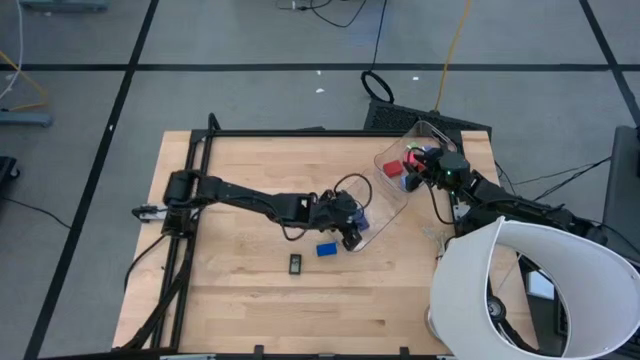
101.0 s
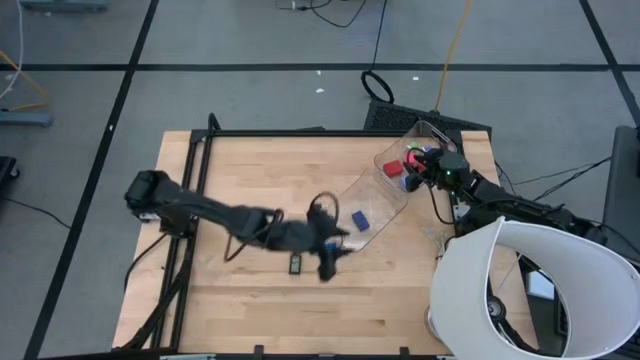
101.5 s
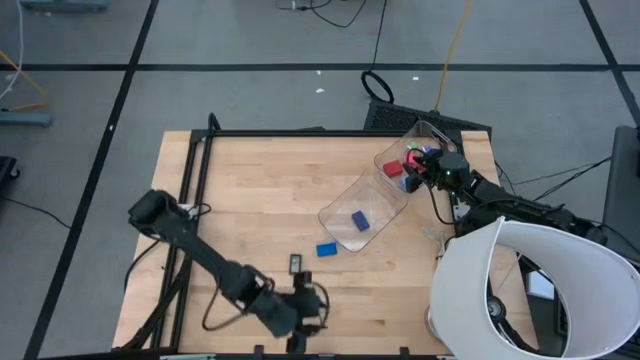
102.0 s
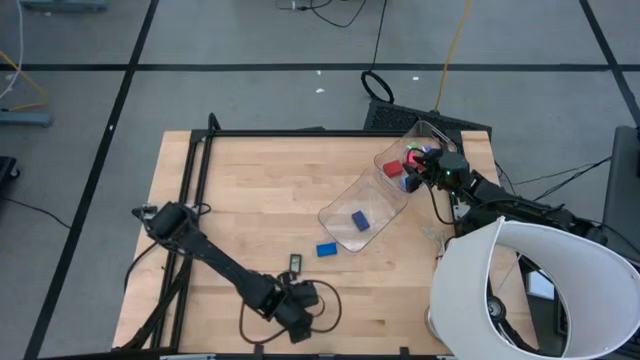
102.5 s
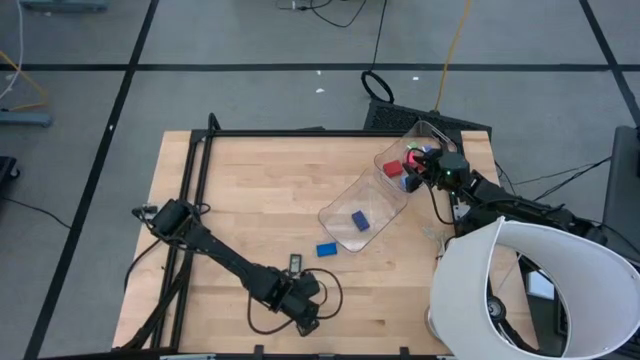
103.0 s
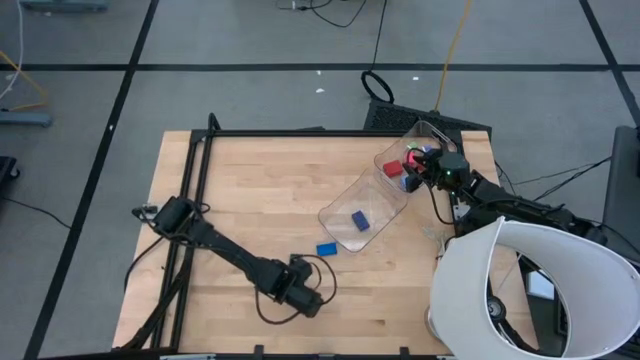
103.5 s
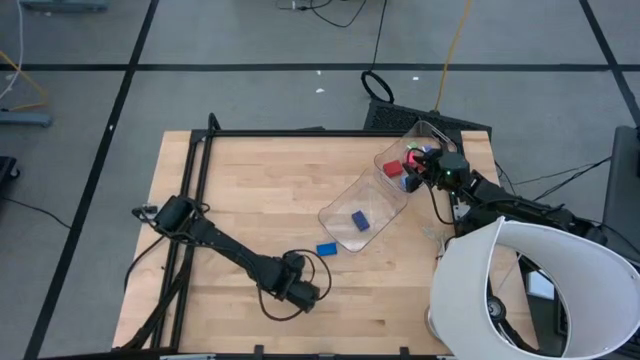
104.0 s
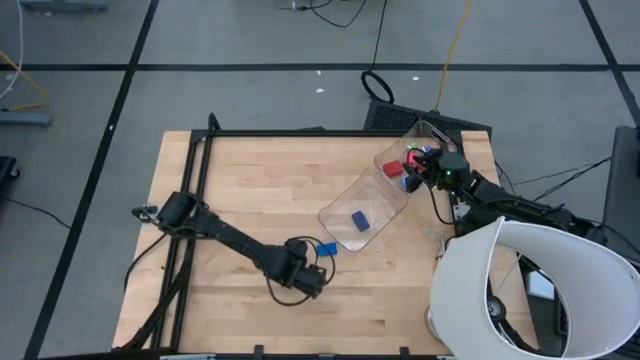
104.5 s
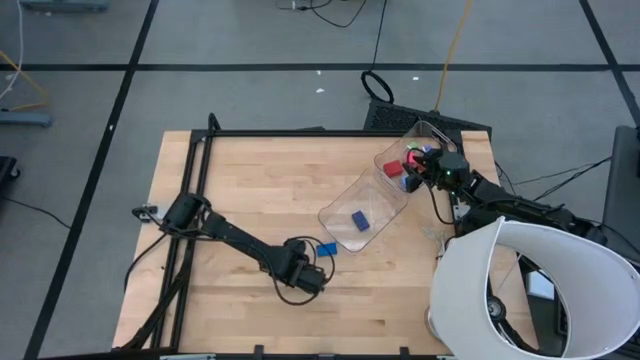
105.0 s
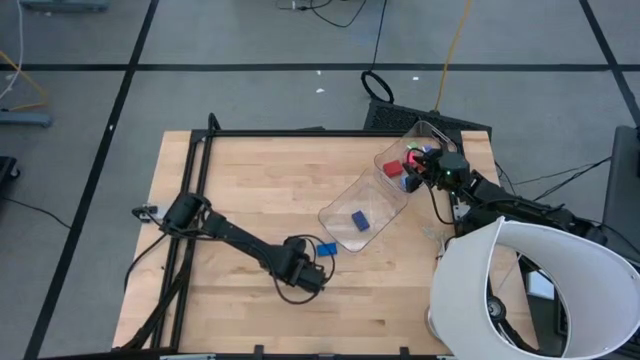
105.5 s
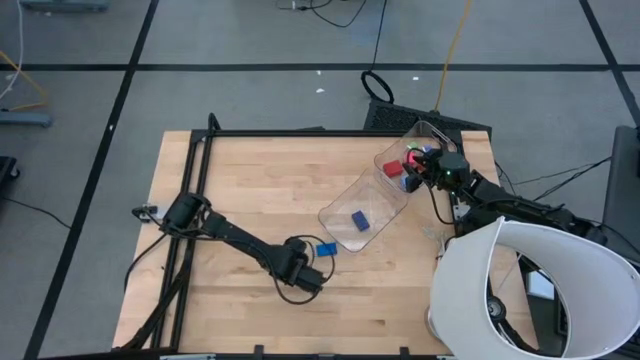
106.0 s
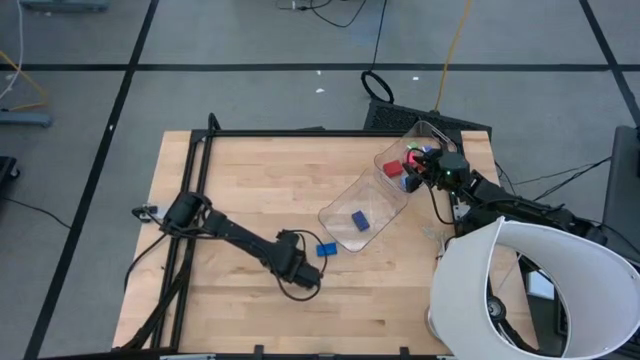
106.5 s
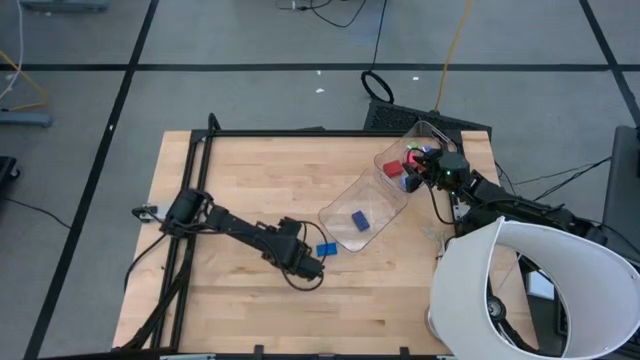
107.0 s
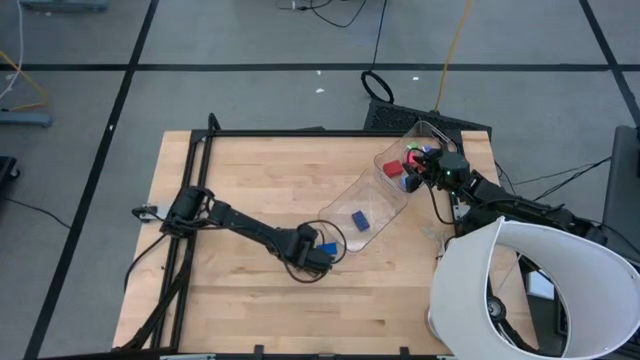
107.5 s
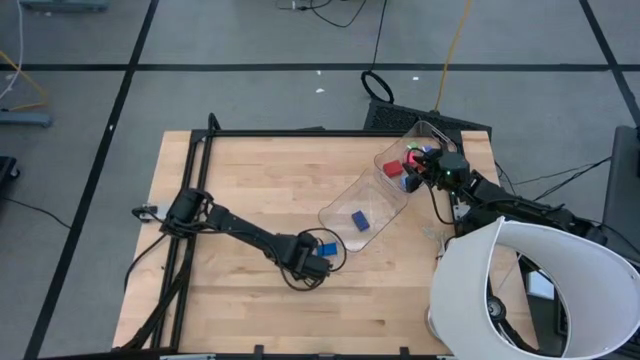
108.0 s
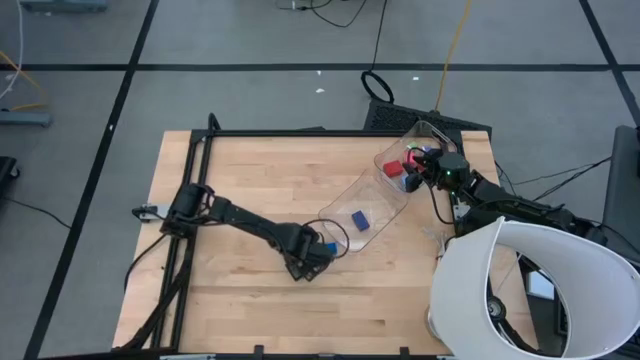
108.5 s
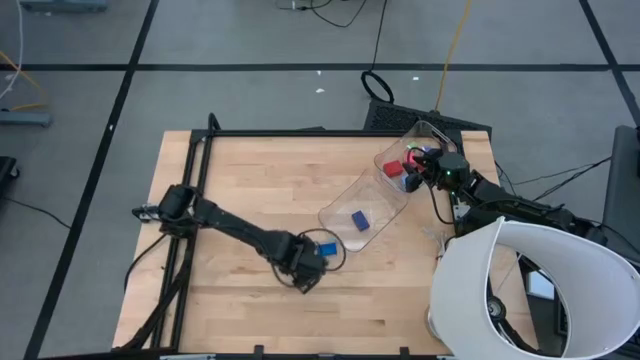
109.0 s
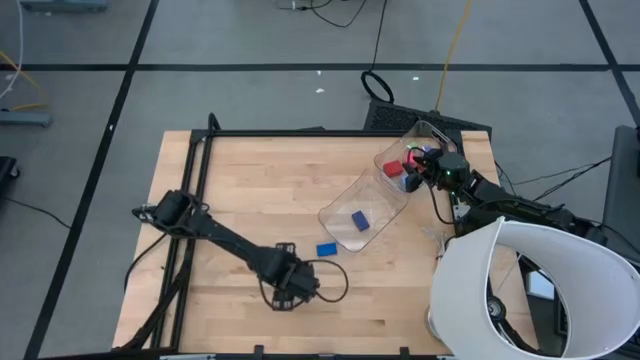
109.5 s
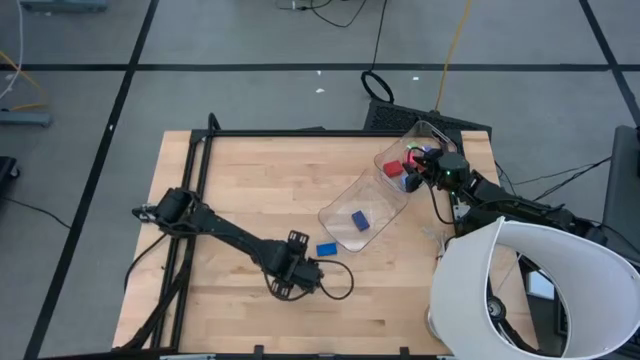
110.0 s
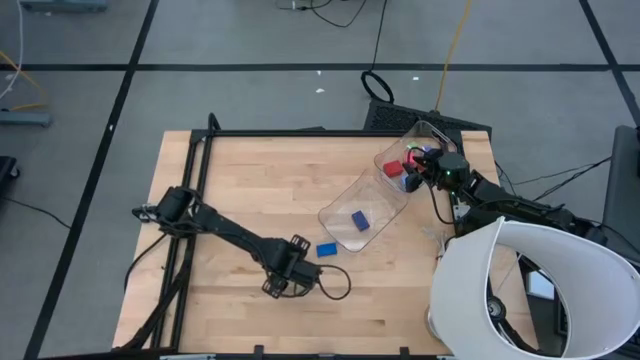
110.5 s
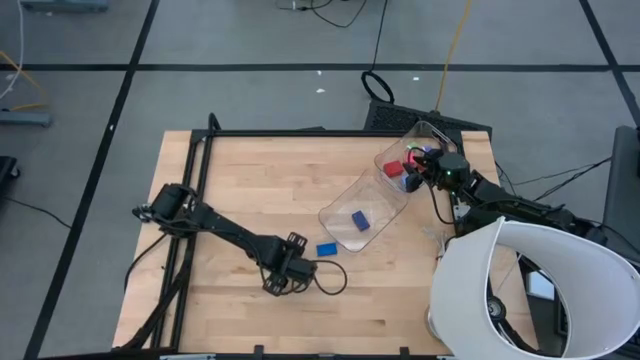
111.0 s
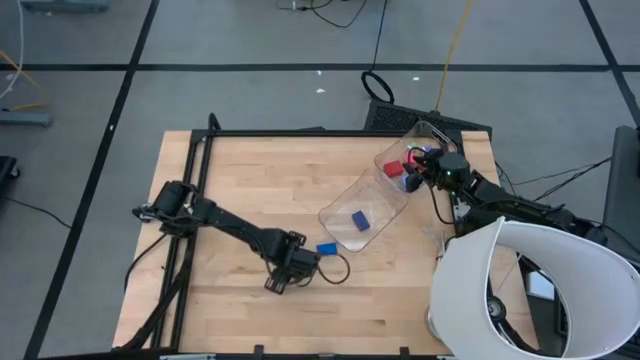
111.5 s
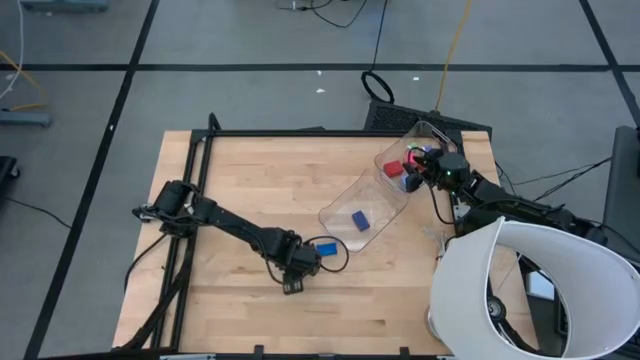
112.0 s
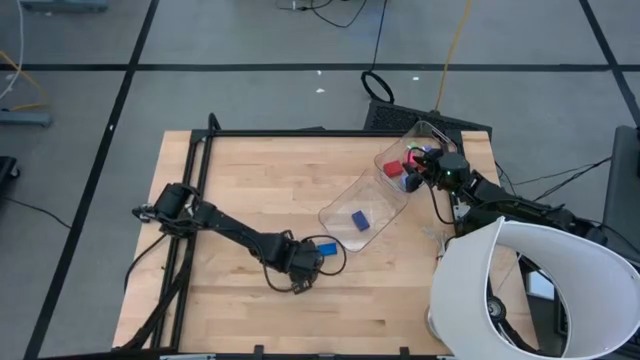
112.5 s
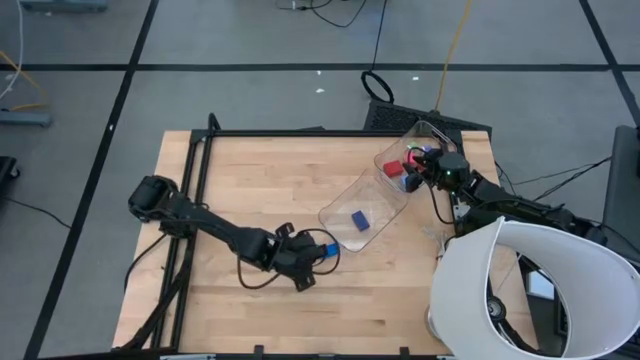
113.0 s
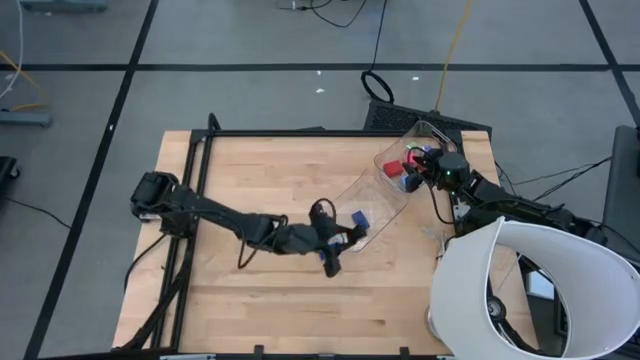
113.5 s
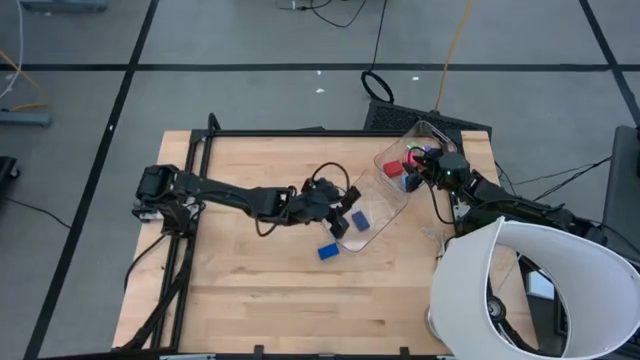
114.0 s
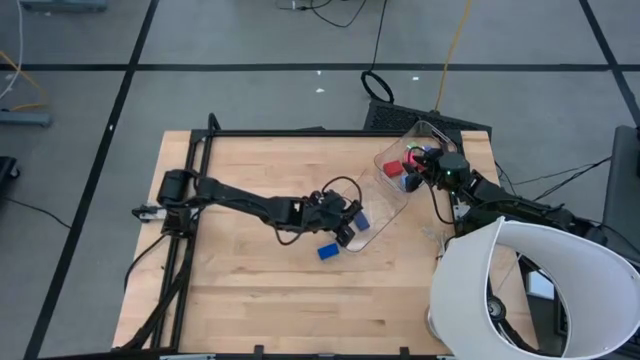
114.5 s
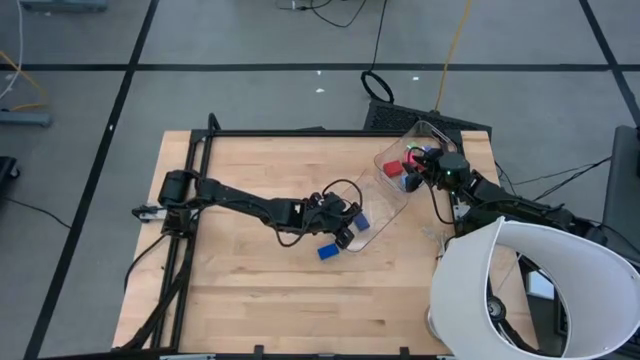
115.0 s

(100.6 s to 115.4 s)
Task: Pick & Place Office items
Put the black digital timer into the left transparent bin

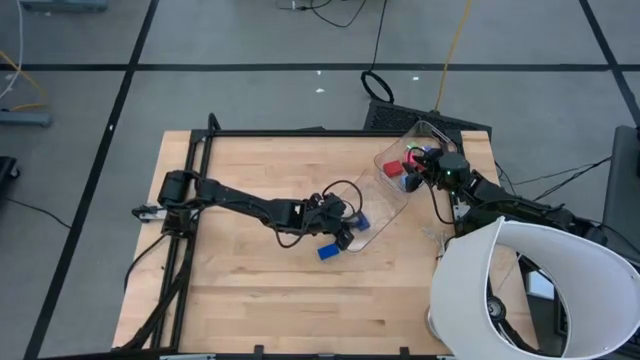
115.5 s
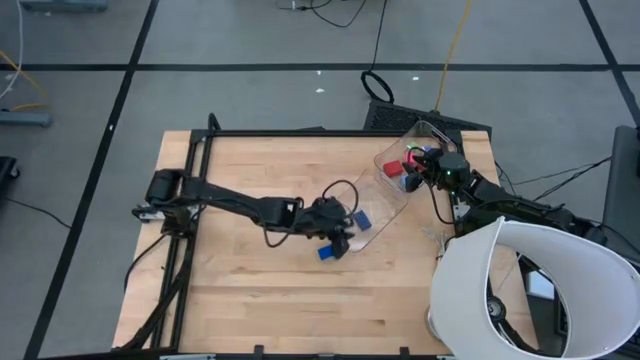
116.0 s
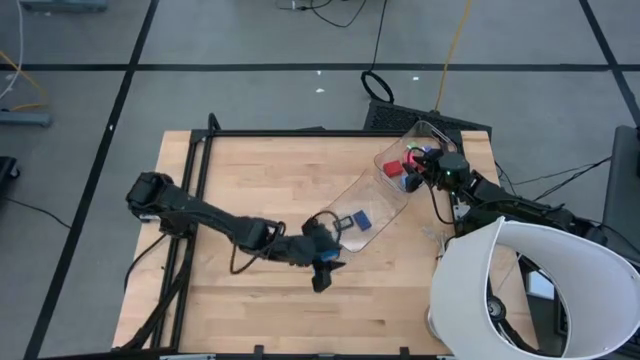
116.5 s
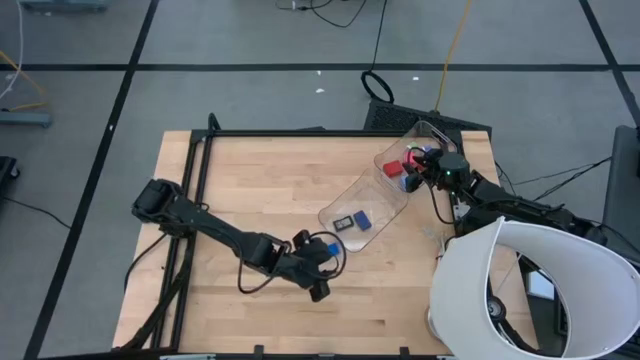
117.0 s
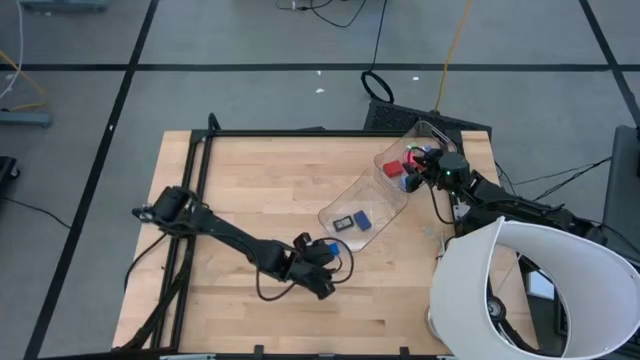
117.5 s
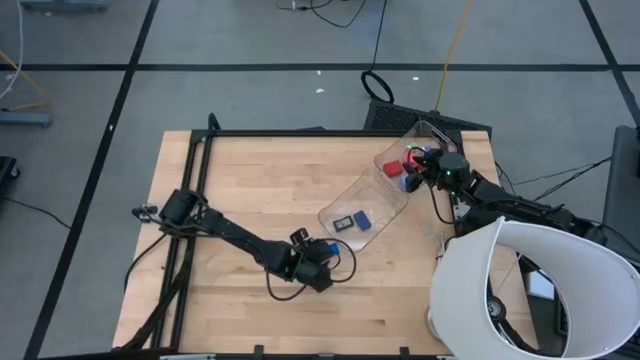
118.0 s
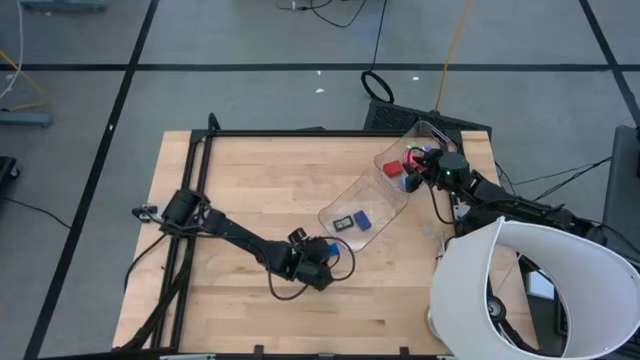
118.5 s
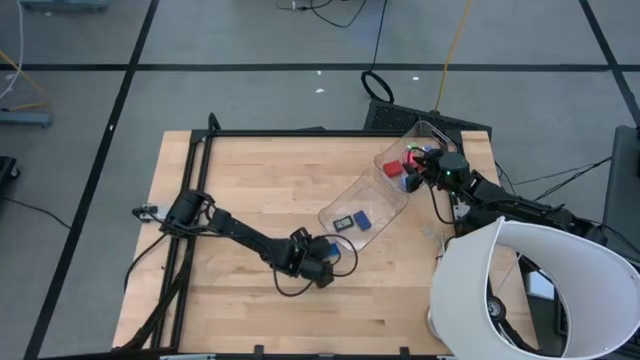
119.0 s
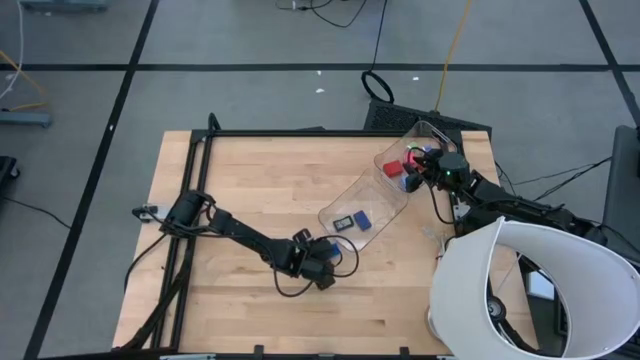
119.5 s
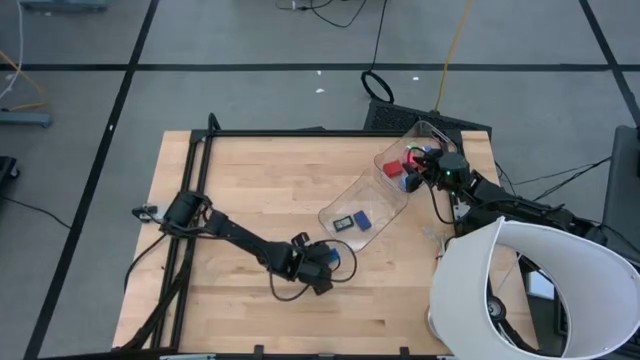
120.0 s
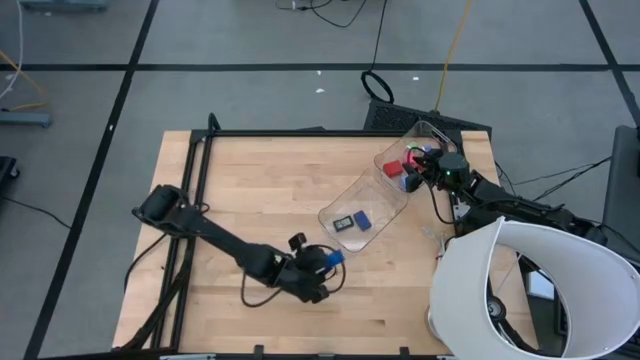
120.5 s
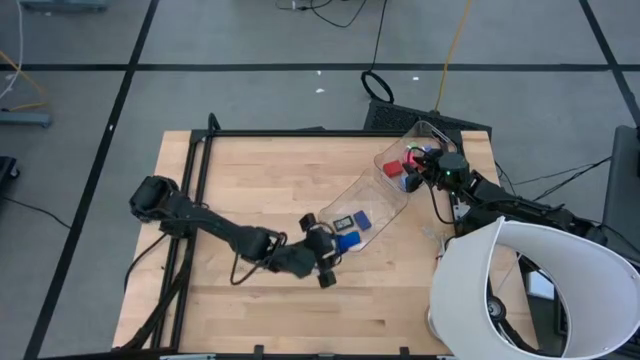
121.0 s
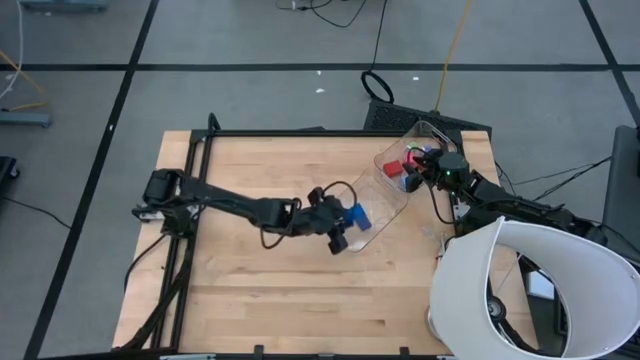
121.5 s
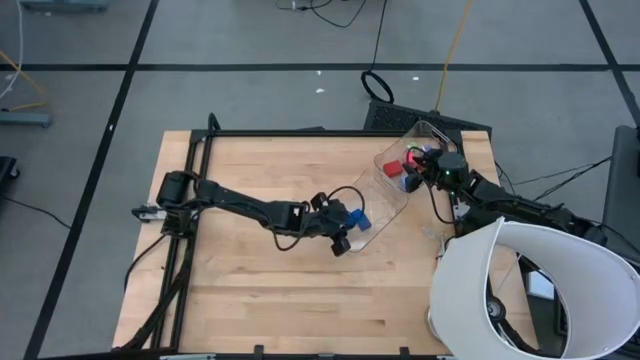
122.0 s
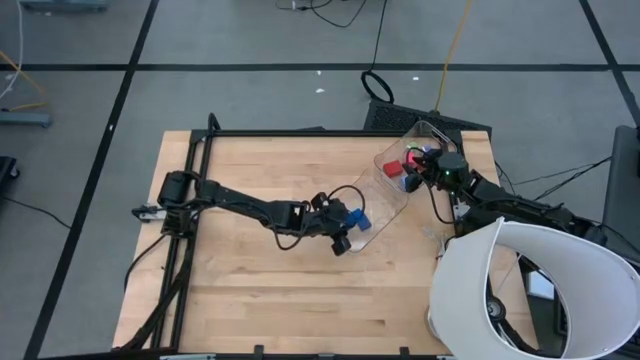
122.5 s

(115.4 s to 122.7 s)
Put the blue digital timer into the left transparent bin
